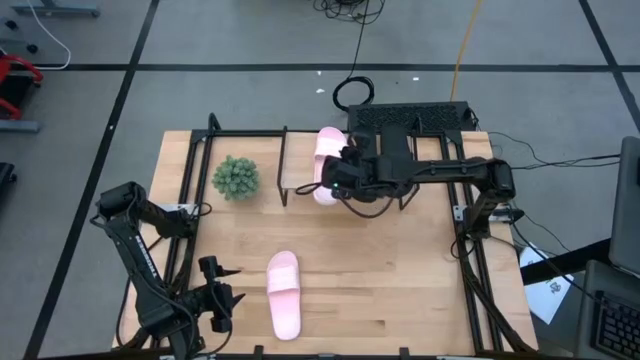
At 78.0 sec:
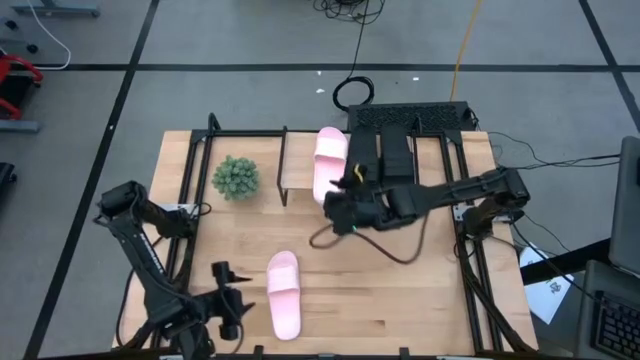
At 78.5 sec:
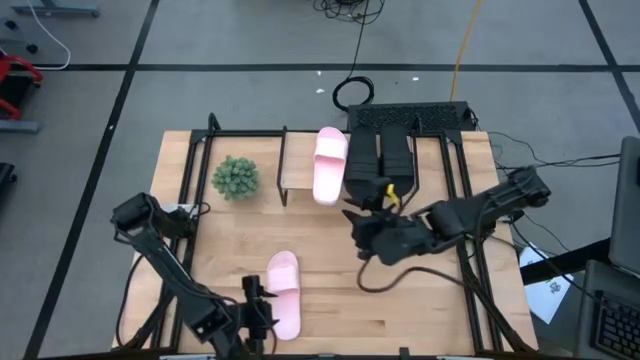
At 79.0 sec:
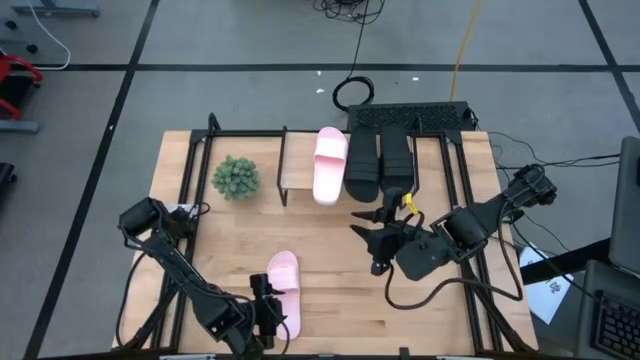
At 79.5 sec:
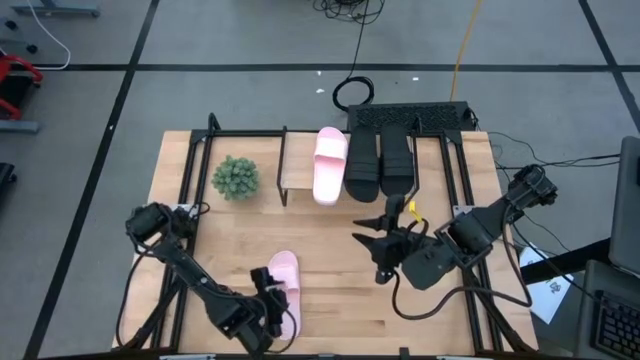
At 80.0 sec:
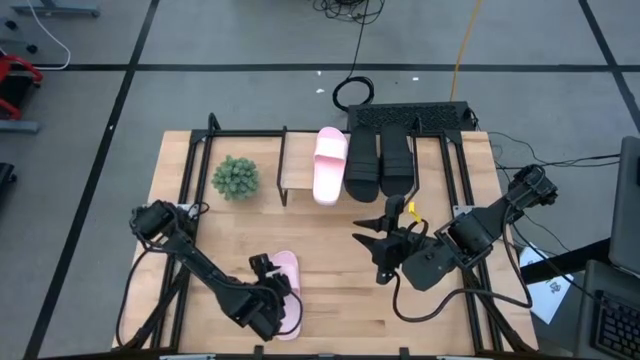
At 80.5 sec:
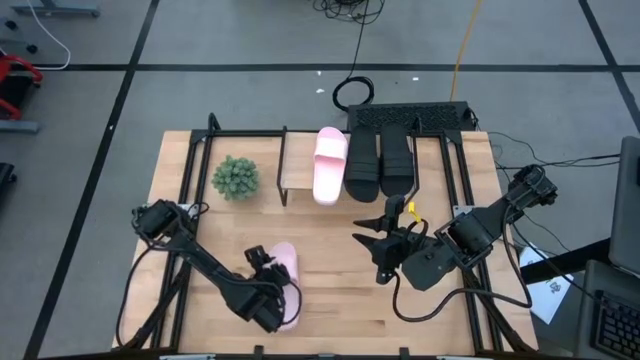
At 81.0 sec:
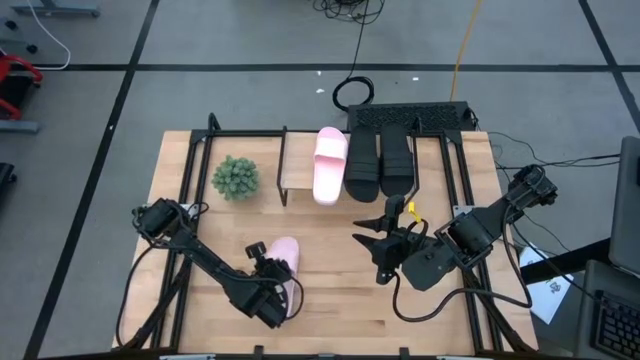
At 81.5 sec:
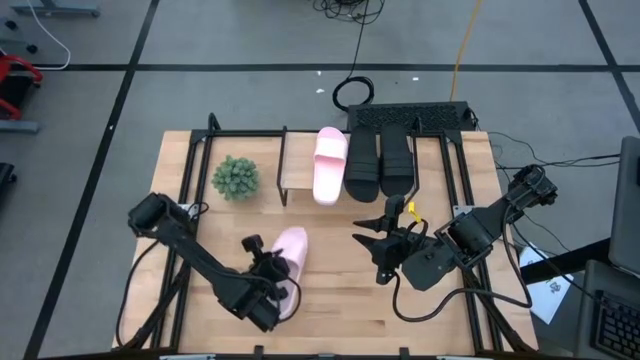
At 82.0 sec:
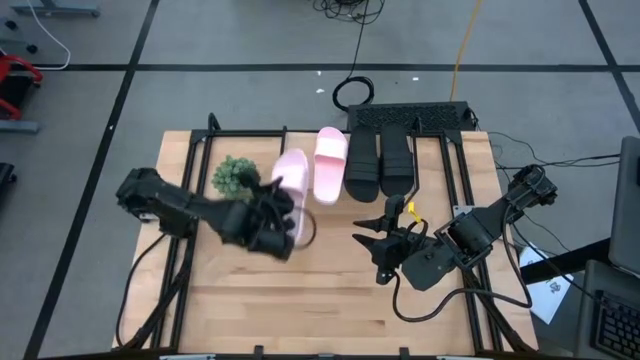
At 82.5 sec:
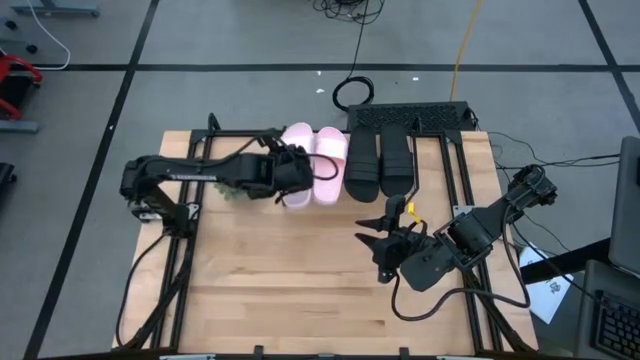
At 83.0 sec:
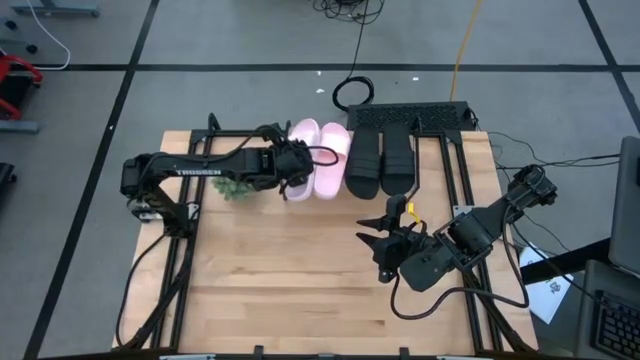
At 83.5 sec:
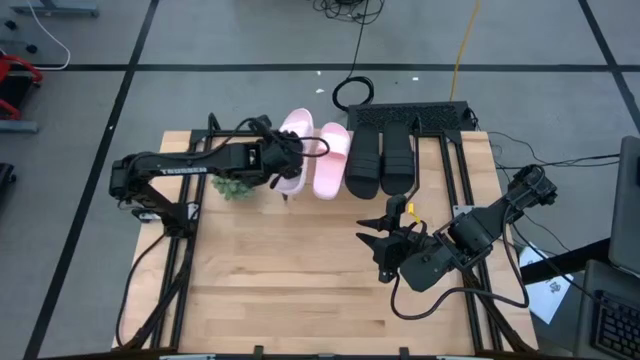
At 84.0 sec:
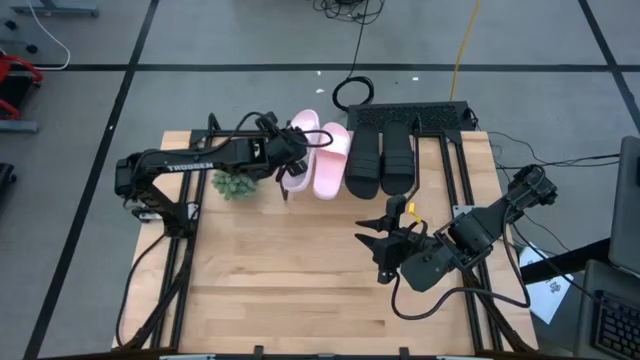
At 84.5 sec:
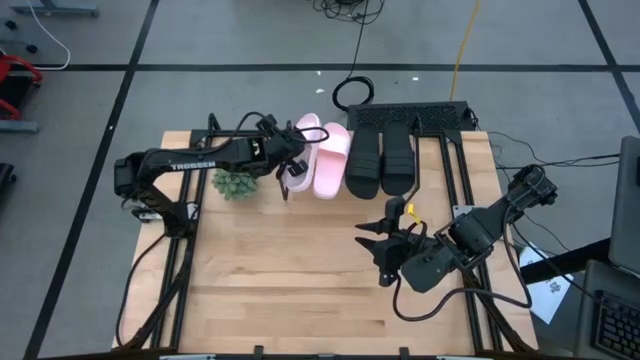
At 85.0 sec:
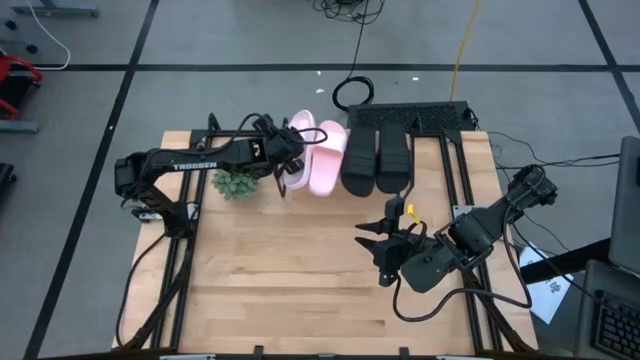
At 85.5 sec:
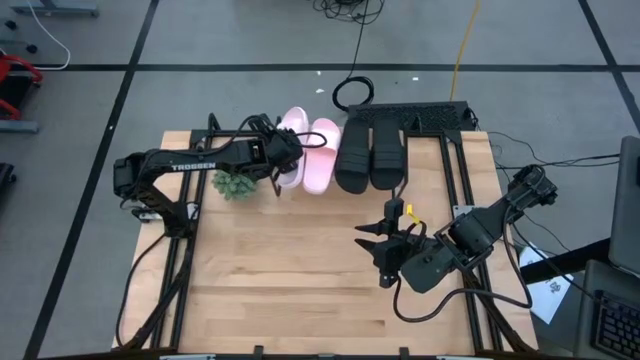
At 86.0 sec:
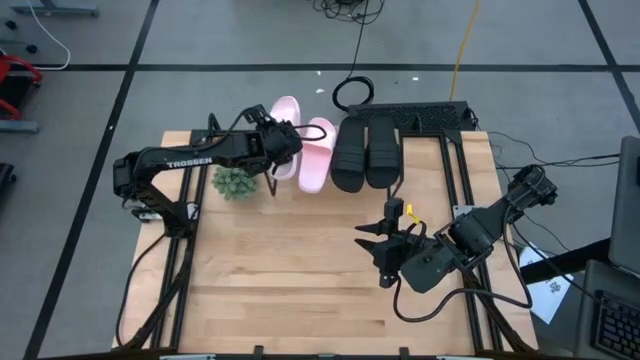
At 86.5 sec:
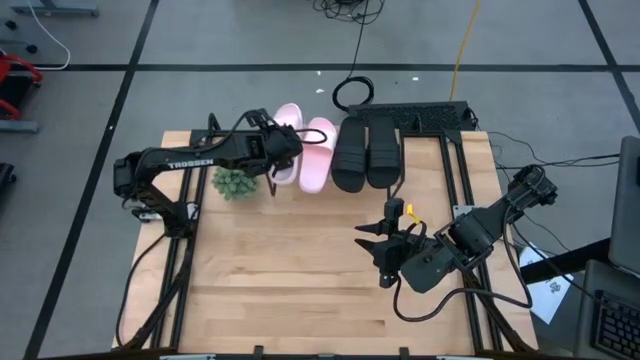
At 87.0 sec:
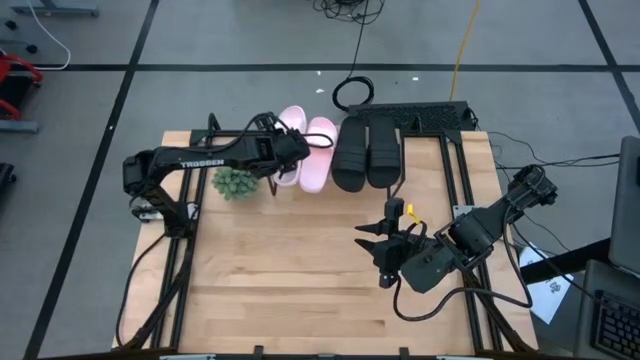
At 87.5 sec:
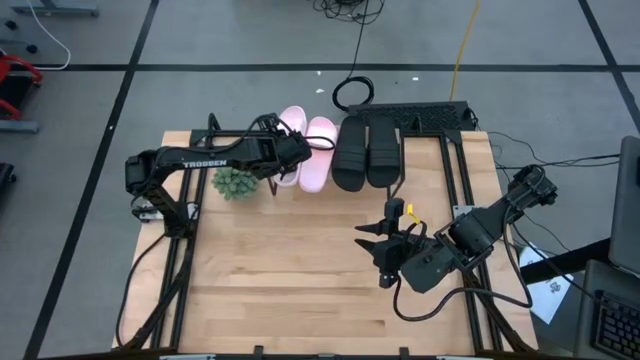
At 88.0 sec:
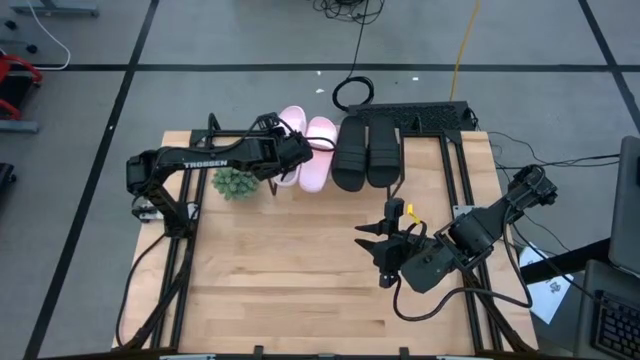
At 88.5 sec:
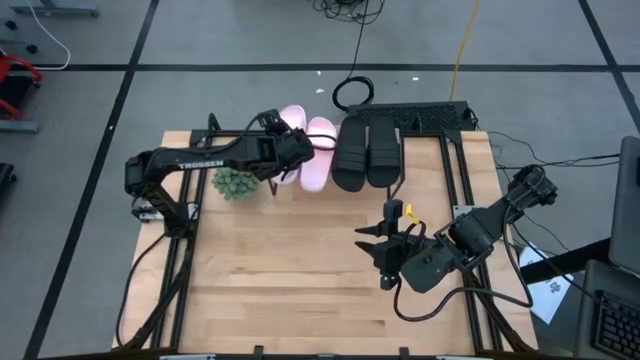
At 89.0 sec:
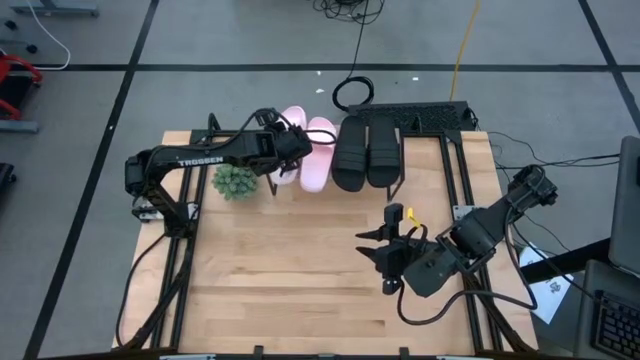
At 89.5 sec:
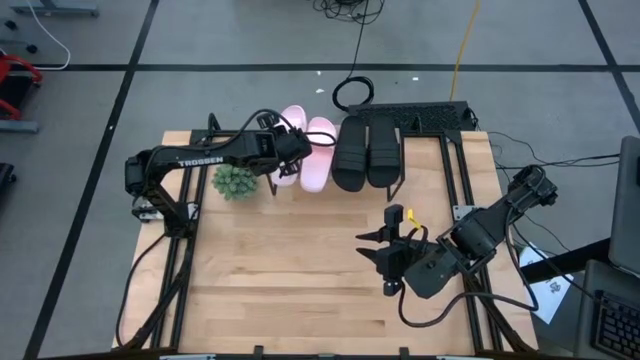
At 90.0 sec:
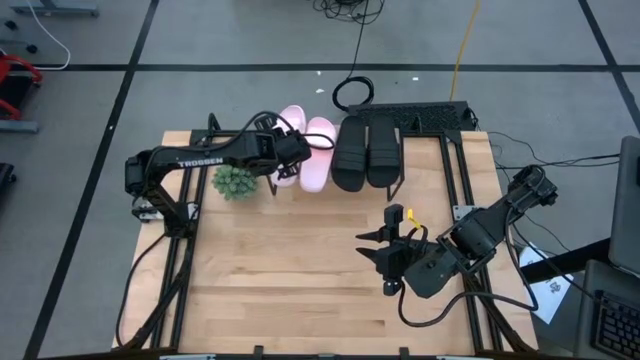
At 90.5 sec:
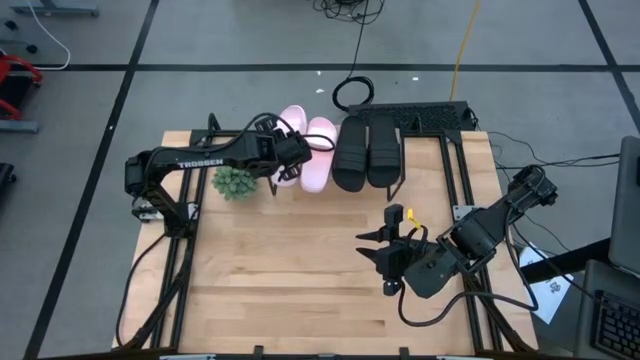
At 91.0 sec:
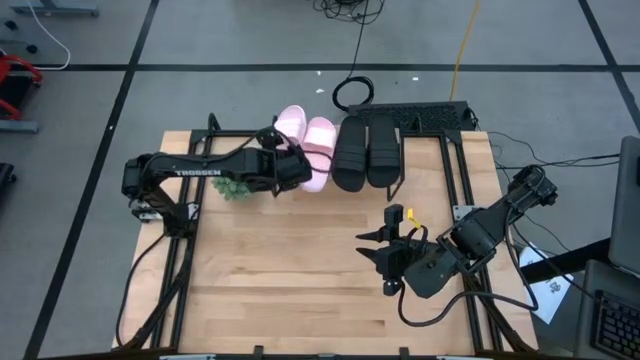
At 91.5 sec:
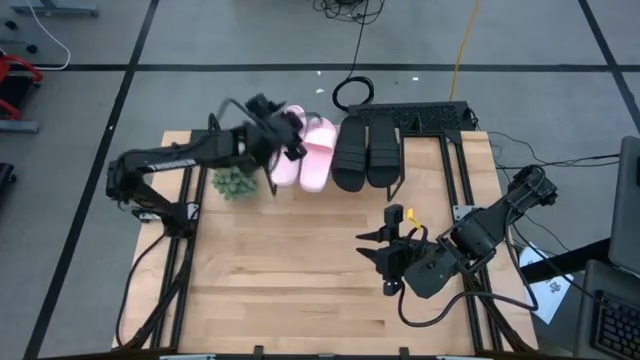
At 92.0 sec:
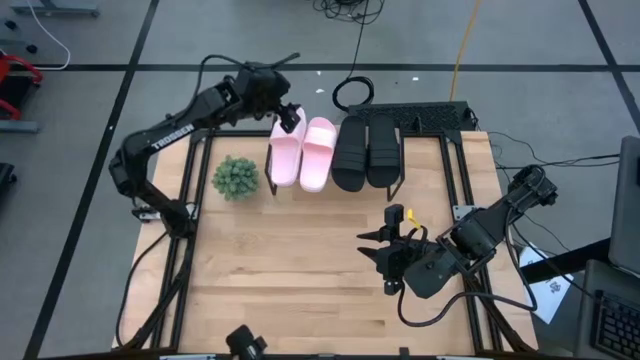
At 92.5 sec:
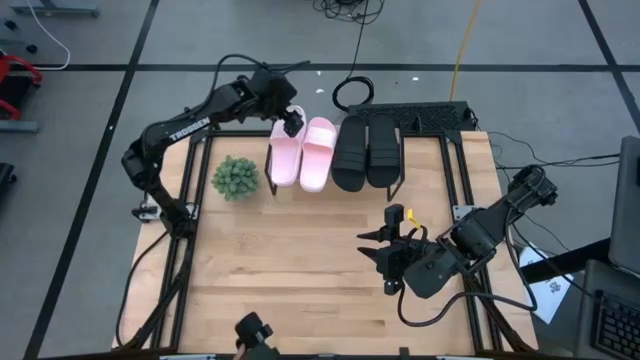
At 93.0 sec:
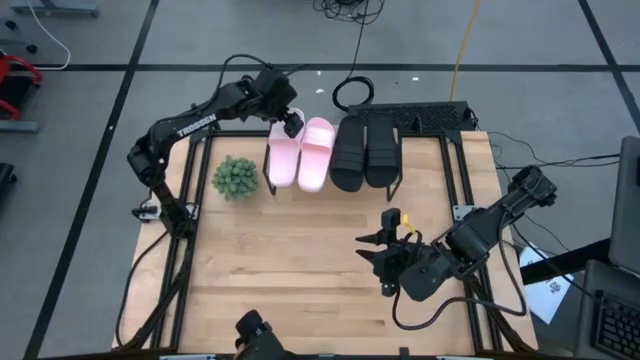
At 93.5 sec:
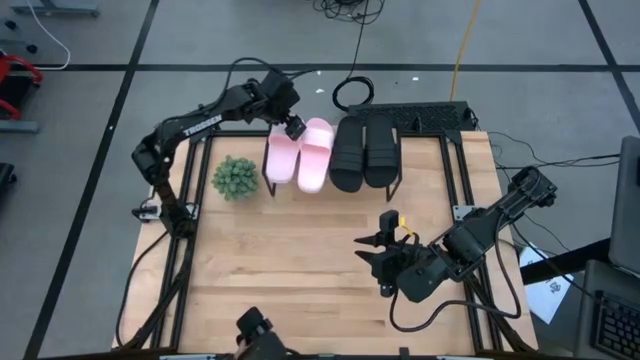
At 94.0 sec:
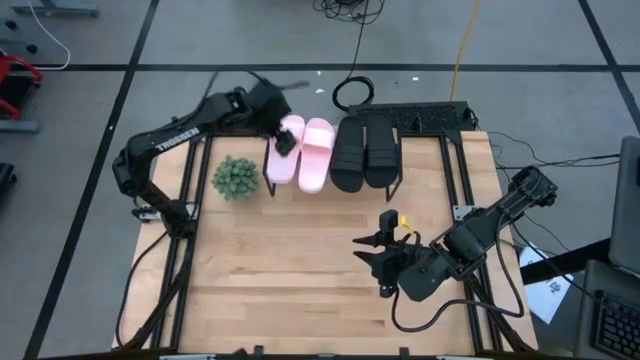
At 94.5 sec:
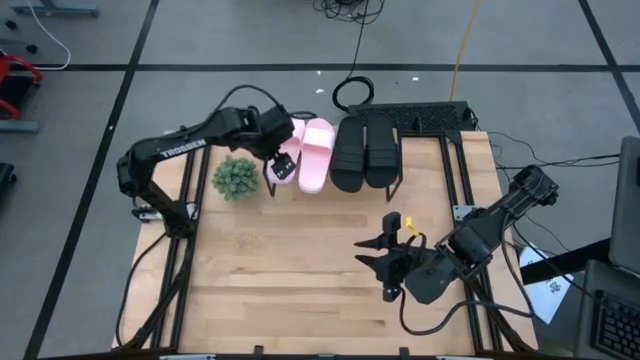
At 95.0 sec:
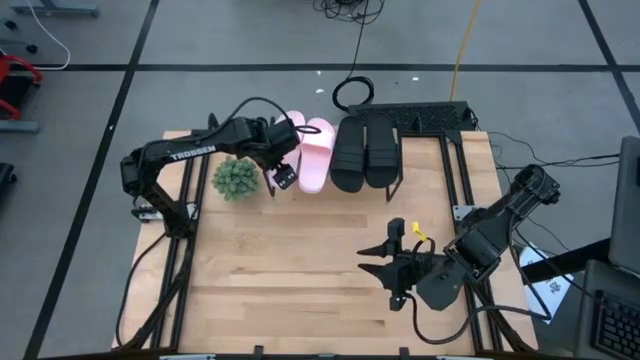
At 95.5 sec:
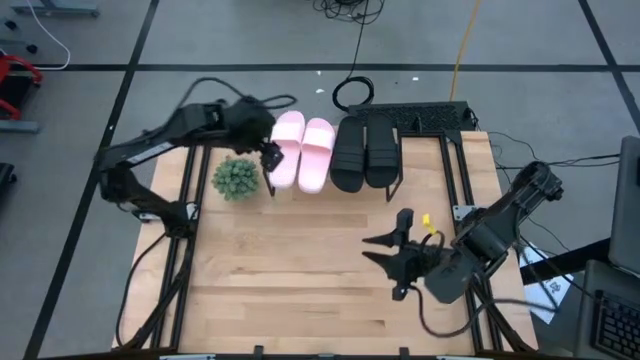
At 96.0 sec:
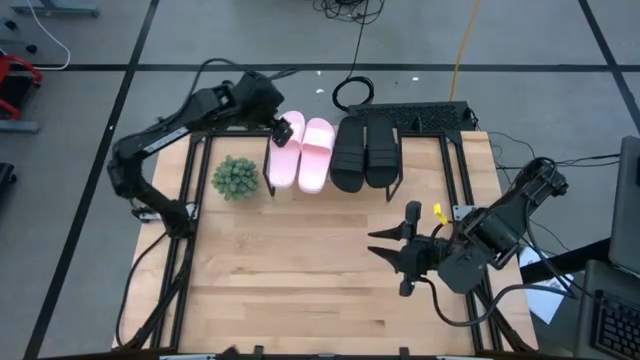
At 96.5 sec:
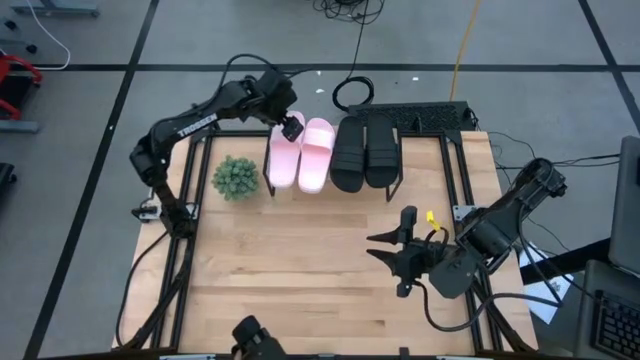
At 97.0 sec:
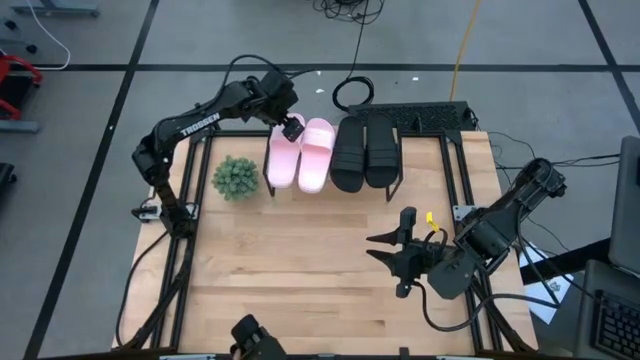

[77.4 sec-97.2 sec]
Task: Pick and place slides into the shelf
Put the pink slipper on the shelf

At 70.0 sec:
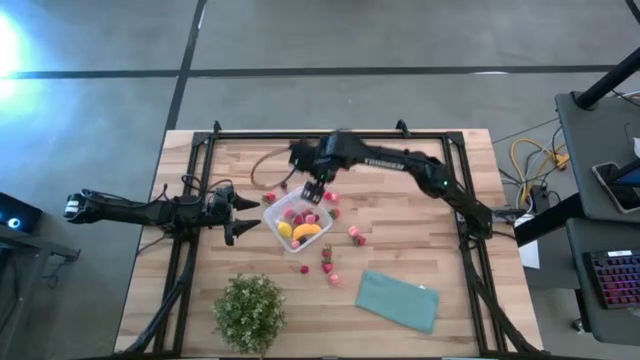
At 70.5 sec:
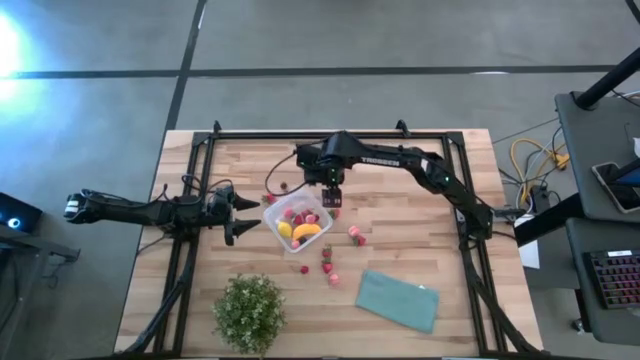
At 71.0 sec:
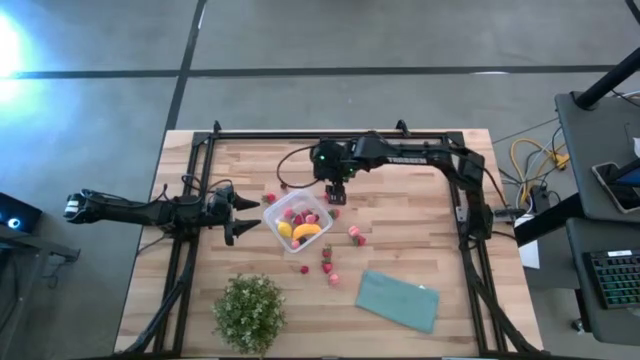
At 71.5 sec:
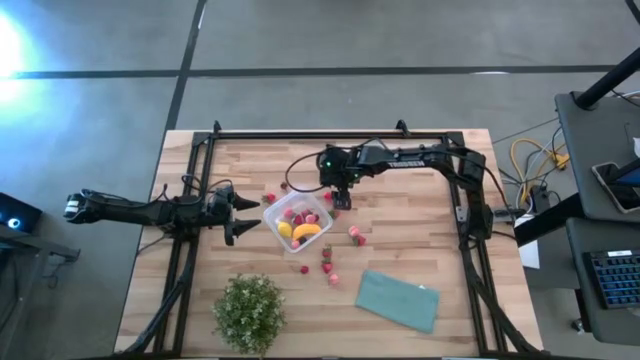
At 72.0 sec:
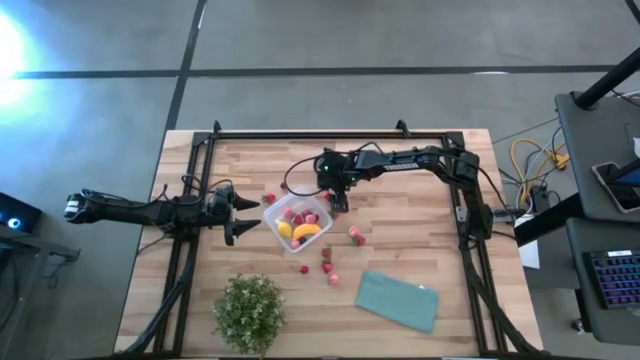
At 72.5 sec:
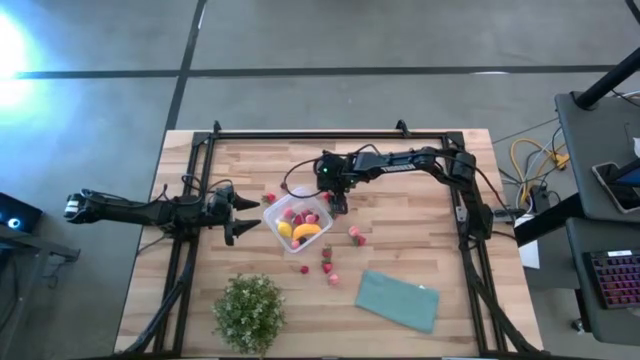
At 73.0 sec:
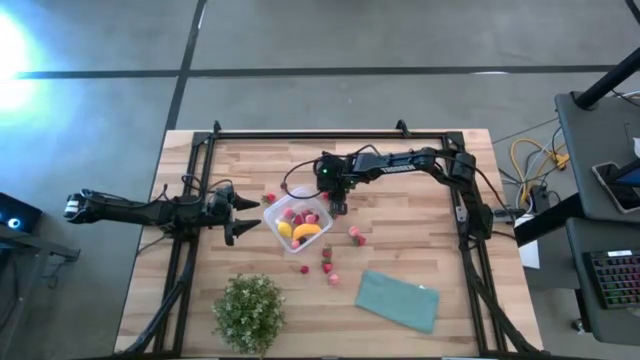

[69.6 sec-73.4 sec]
Task: Pick and placing Produce into tupperware
Put the red cherry into the transparent bin
